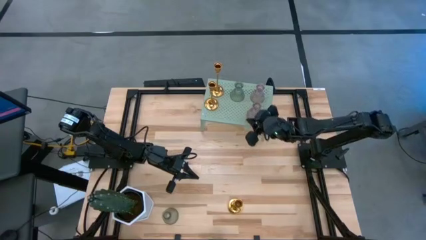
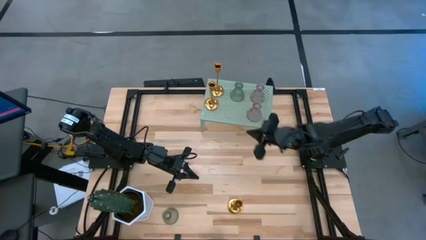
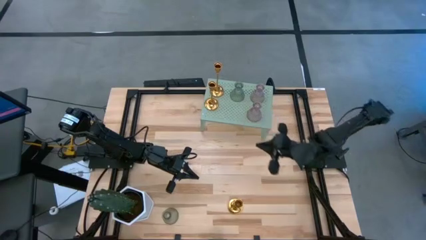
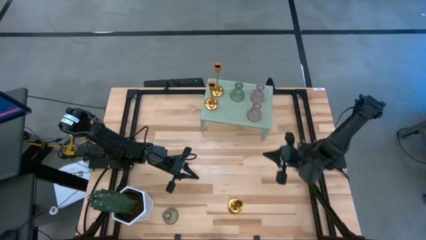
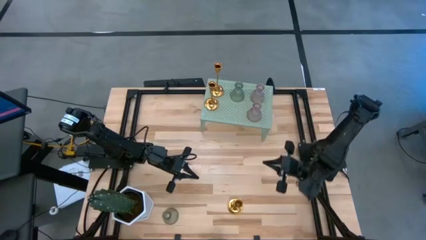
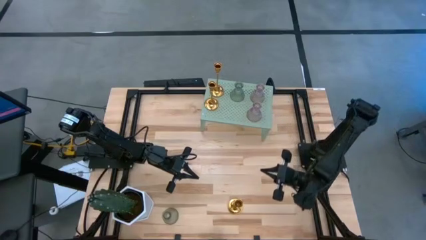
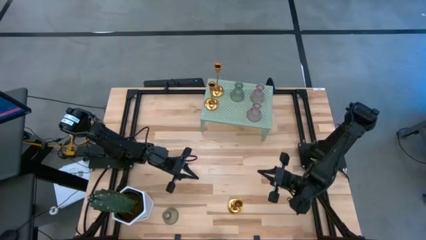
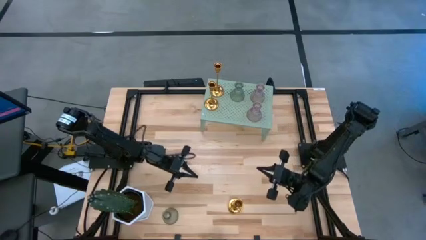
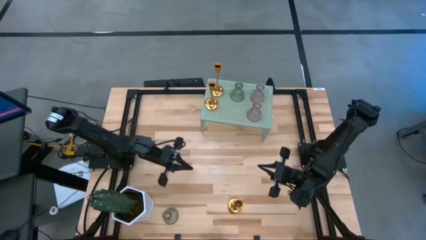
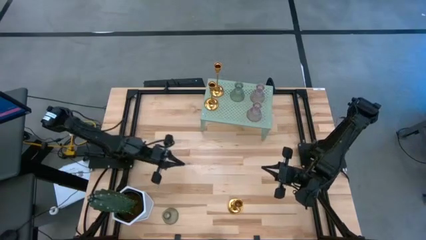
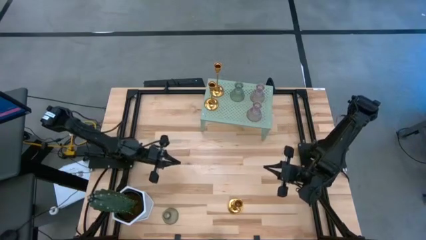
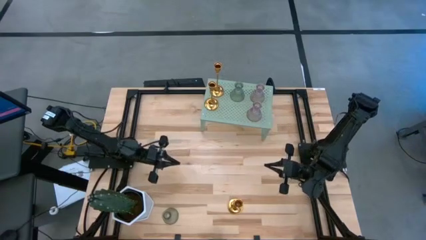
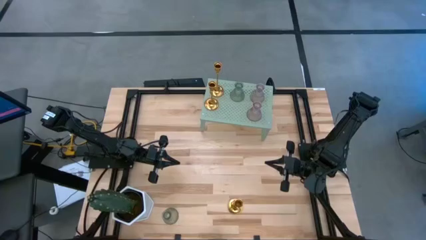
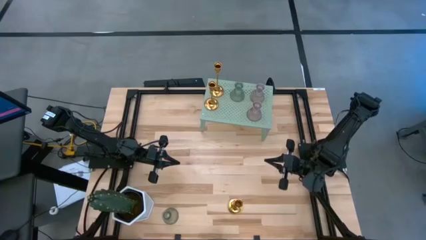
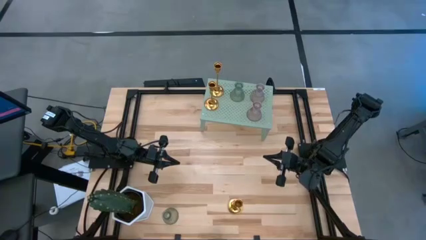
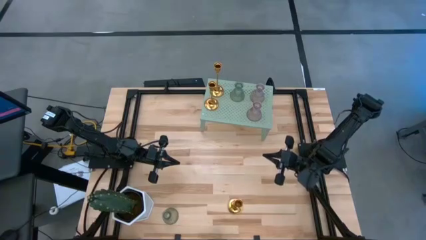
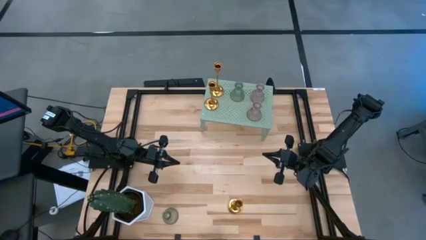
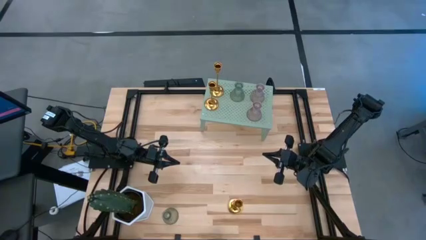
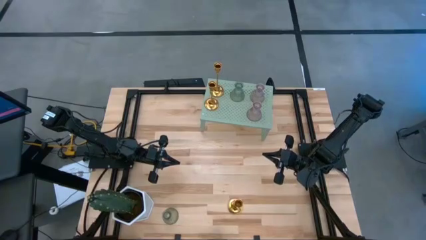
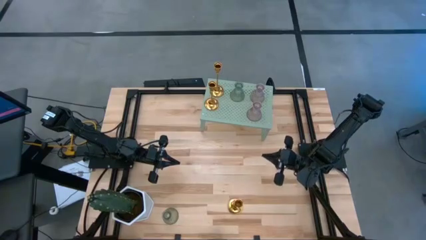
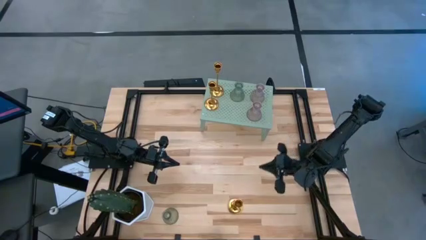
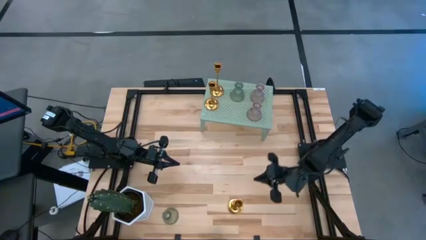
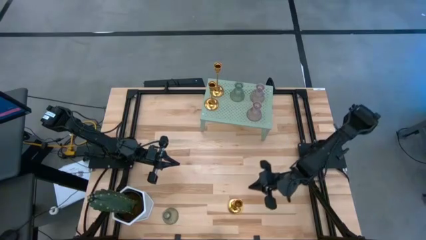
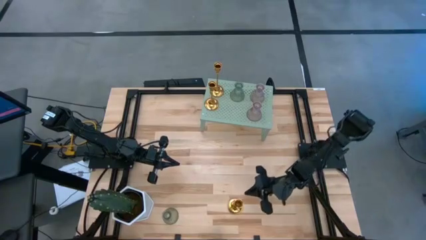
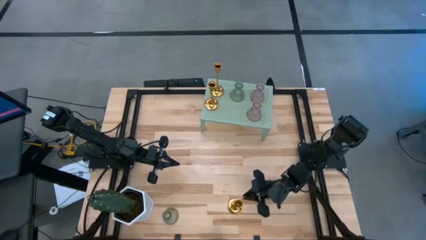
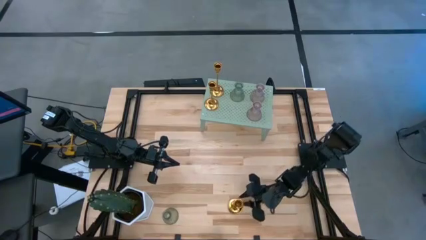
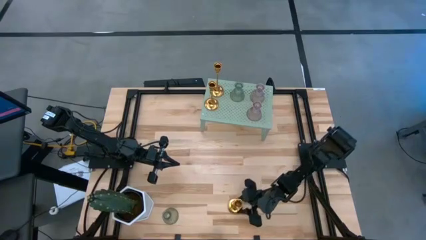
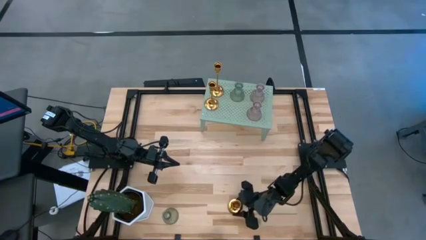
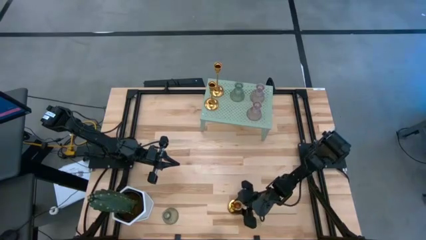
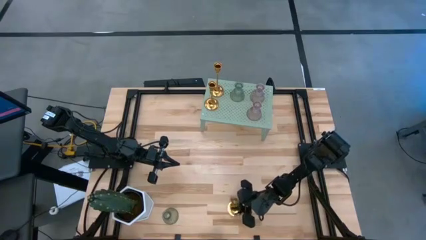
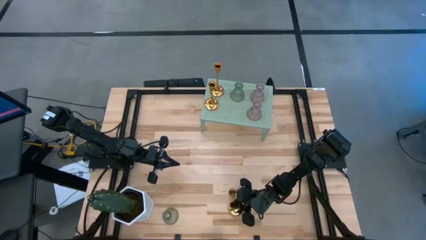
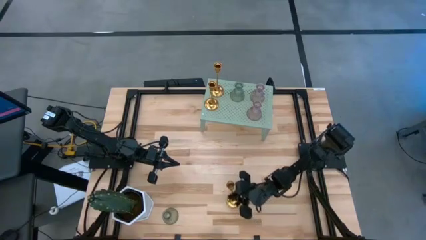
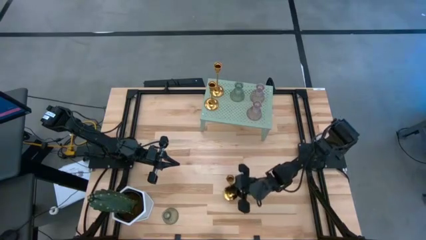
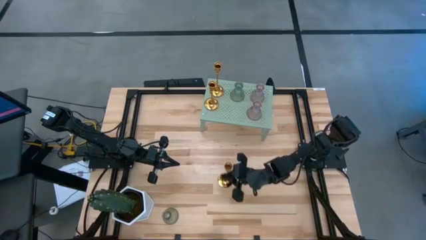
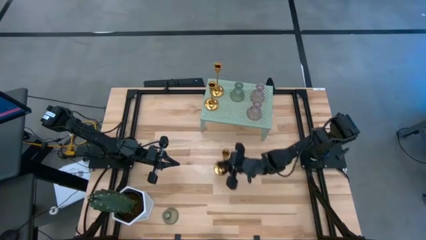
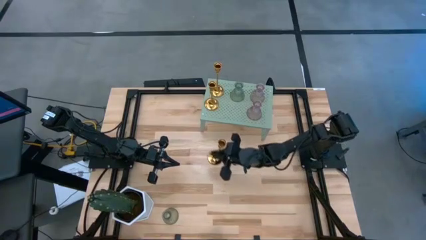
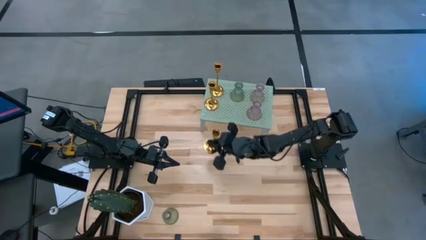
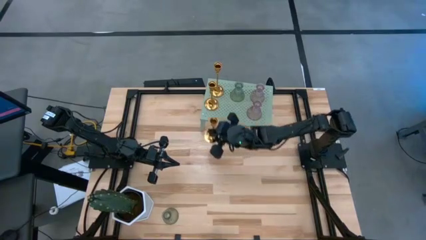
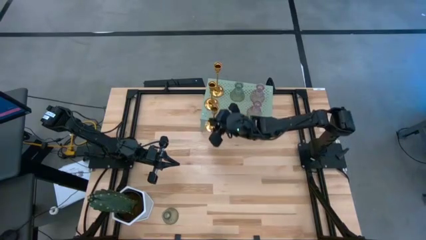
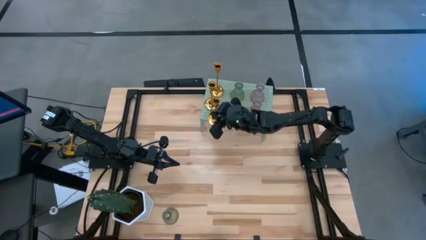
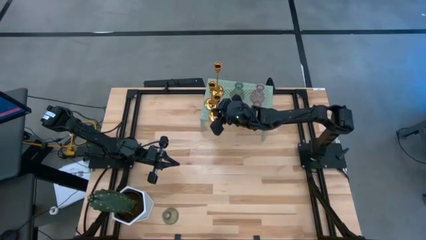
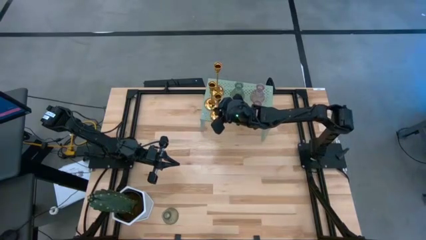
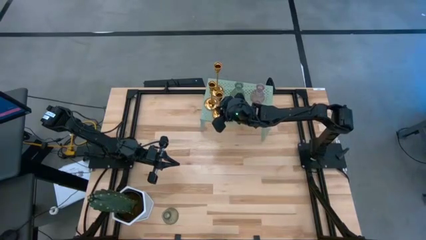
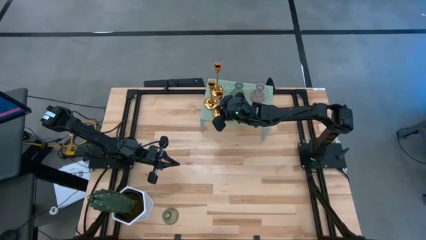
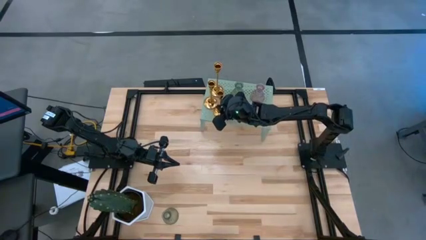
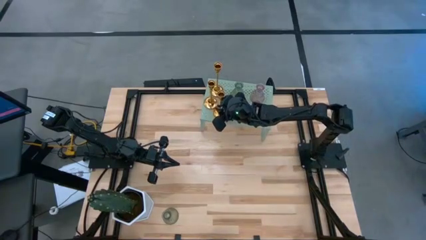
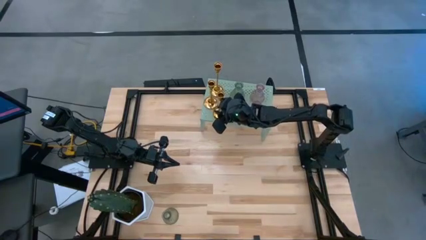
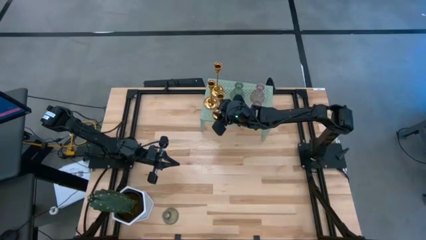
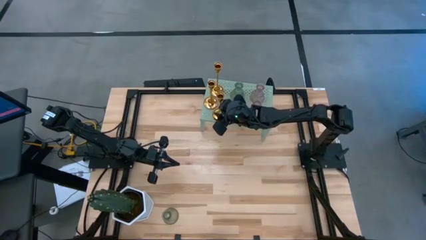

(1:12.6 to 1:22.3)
Task: Pick & Place candle stick holders
Put the golden candle holder on the shelf aligned with the other golden candle holders
